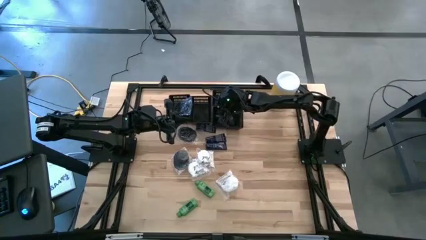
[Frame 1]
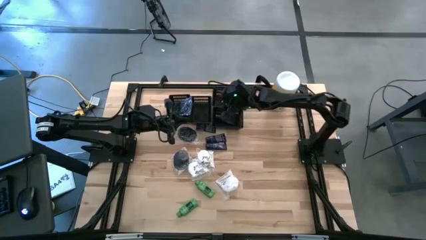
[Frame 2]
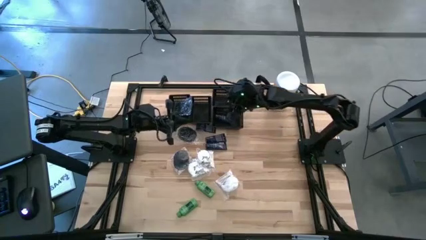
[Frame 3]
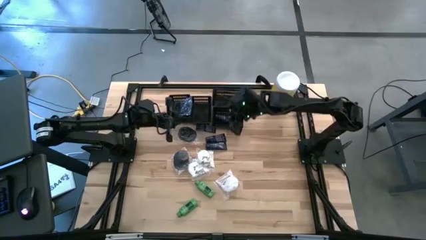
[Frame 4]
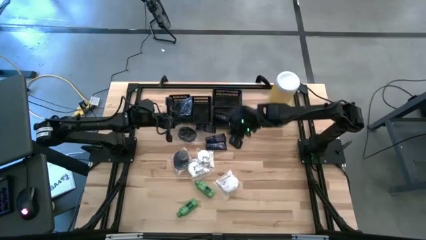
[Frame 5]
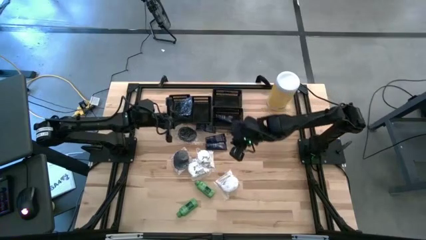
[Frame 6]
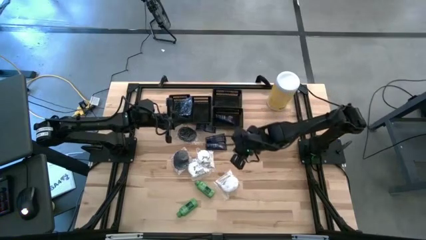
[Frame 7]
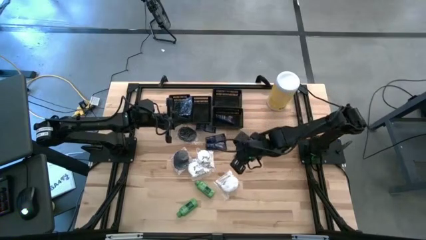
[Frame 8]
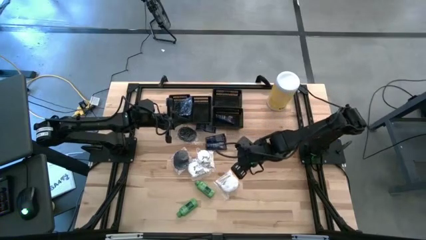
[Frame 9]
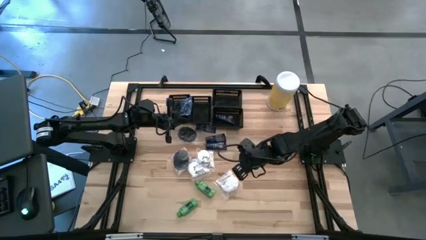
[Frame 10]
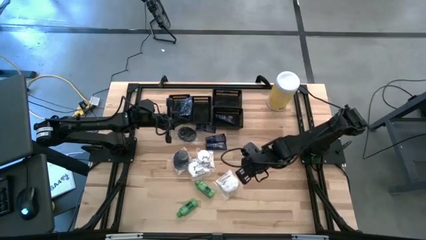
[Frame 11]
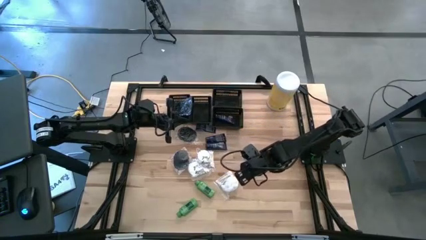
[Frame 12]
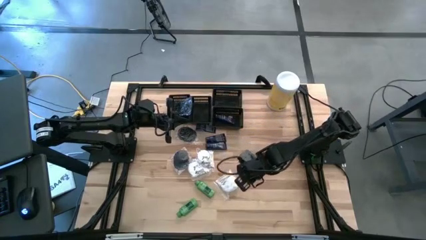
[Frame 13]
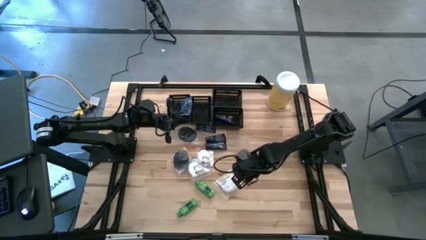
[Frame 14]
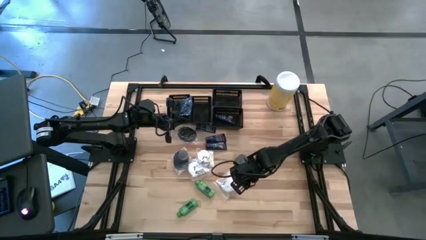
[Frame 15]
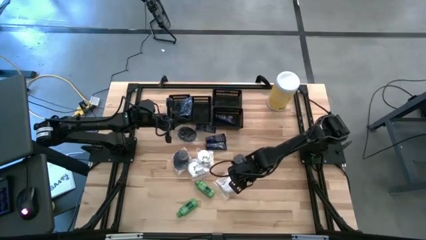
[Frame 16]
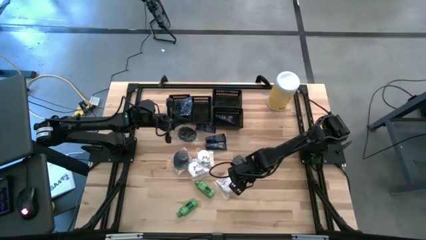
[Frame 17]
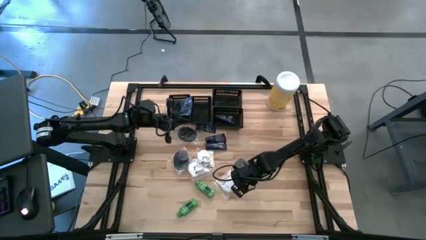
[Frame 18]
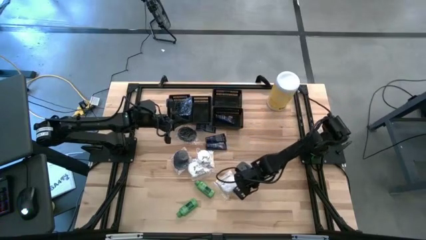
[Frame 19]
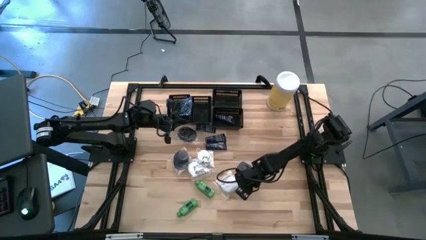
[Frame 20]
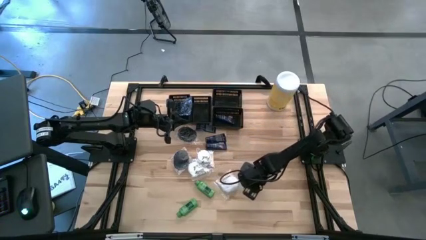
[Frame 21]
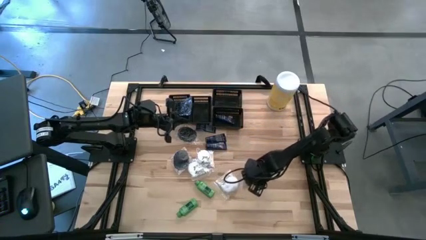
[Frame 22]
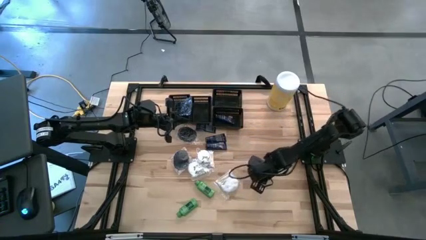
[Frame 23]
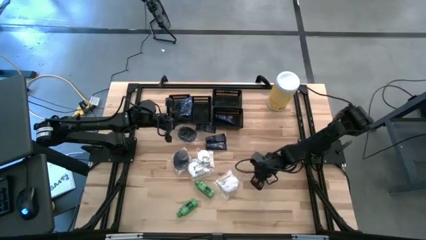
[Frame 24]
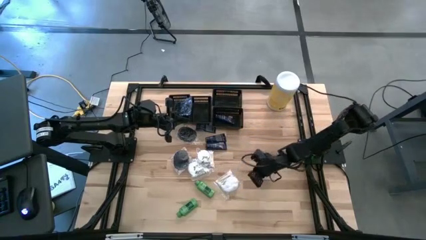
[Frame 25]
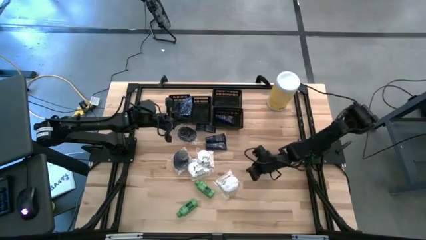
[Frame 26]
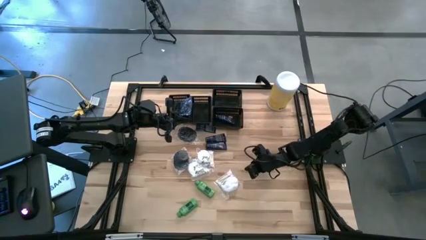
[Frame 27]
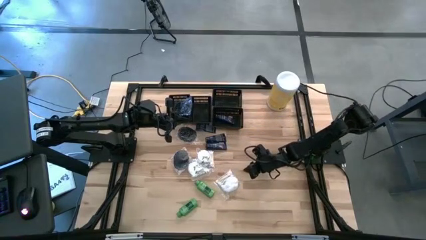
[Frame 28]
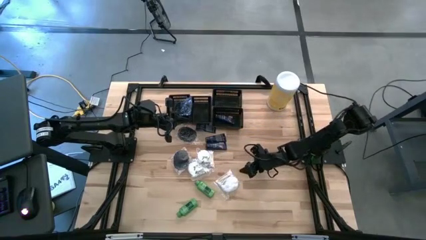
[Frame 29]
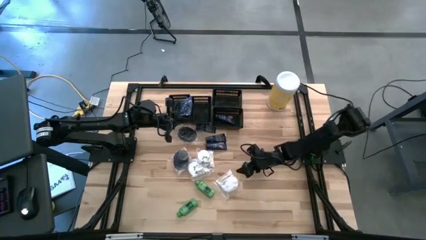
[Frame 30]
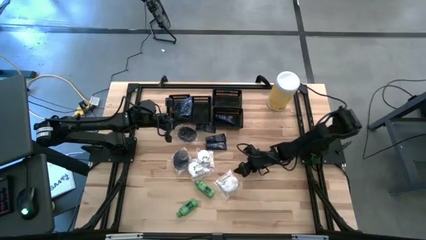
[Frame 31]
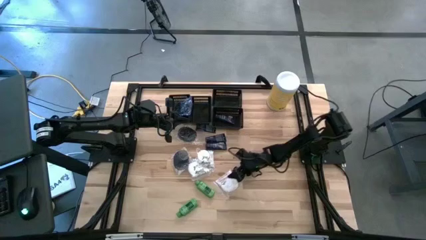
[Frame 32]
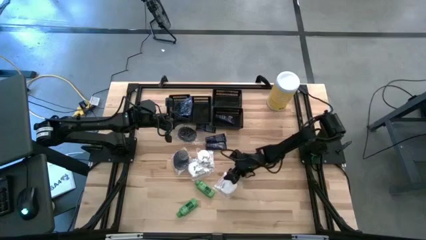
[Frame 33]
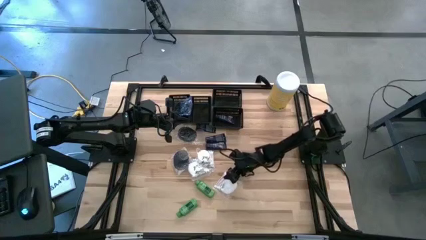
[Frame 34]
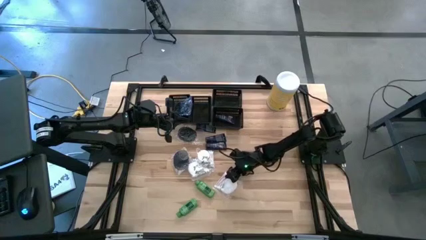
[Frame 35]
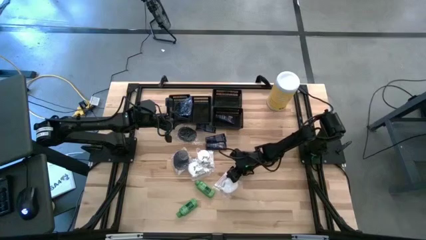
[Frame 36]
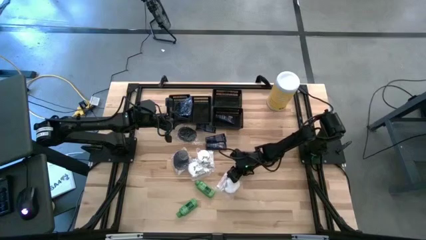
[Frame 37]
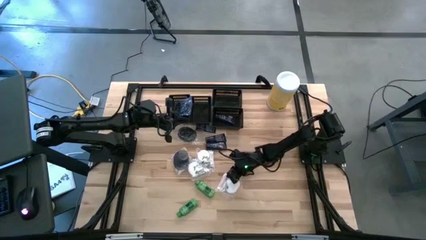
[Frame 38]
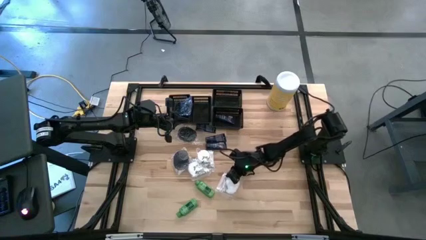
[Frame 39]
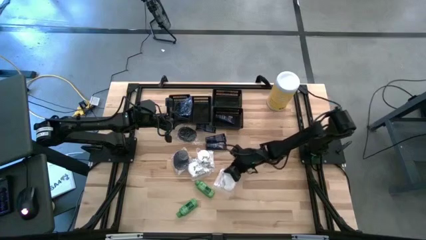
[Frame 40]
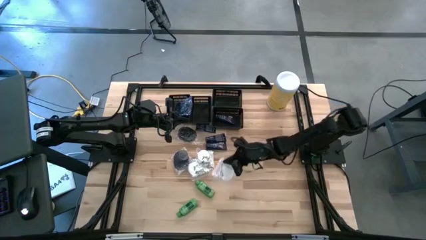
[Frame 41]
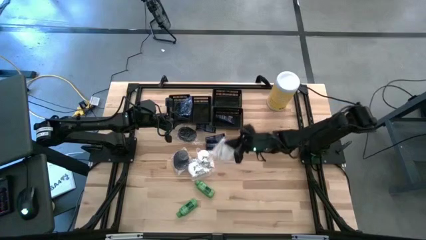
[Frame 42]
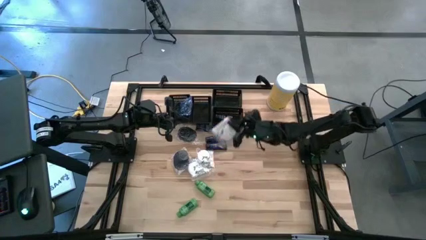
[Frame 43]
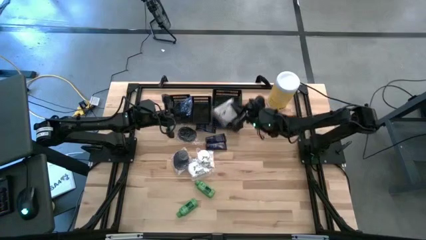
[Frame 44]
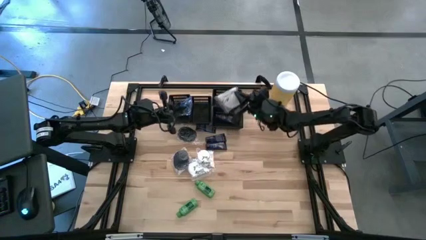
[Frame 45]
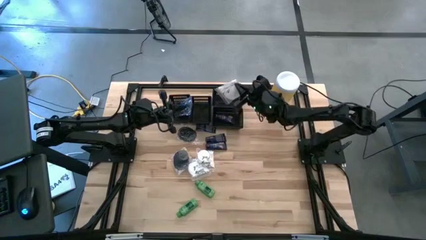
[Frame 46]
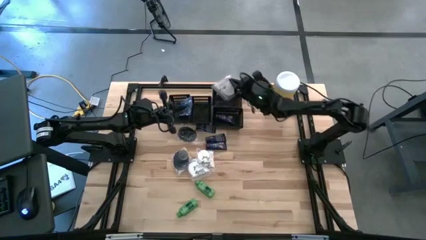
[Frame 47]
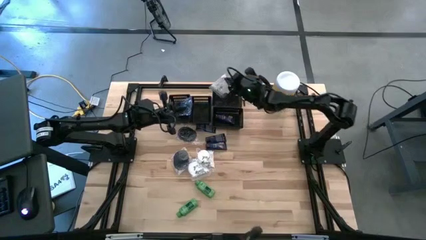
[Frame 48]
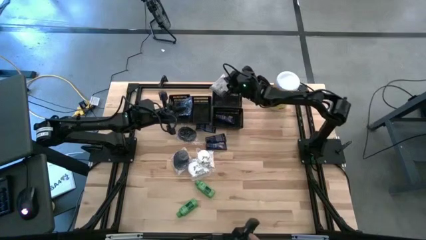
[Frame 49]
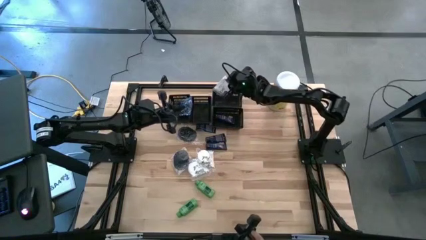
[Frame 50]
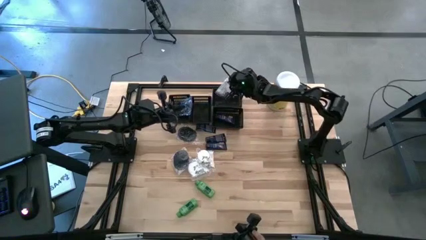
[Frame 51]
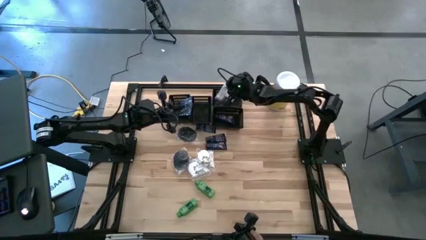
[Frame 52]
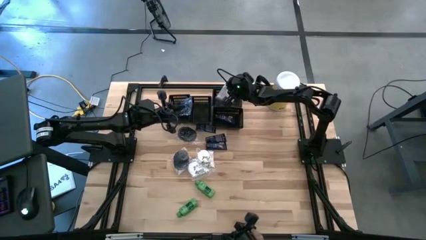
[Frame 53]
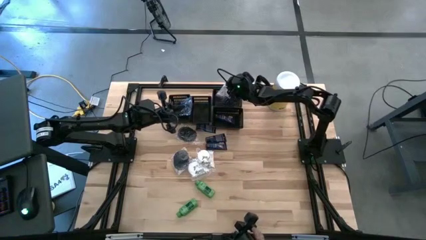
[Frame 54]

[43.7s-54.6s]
Task: Pick & Place Travel size toiletries
Put the bottom white cotton buds into the top black bin
